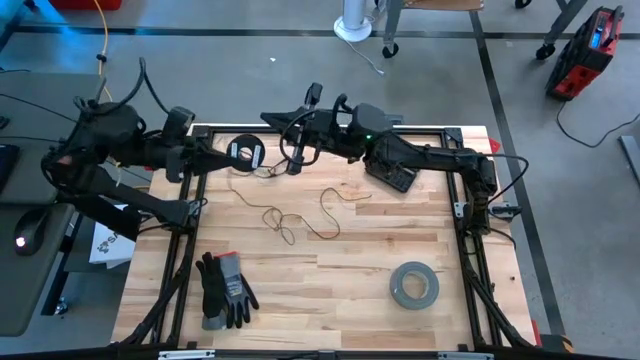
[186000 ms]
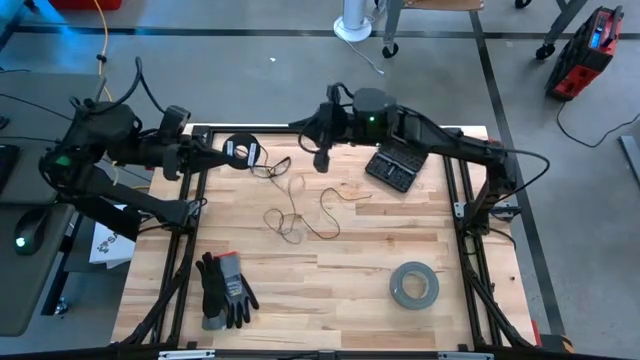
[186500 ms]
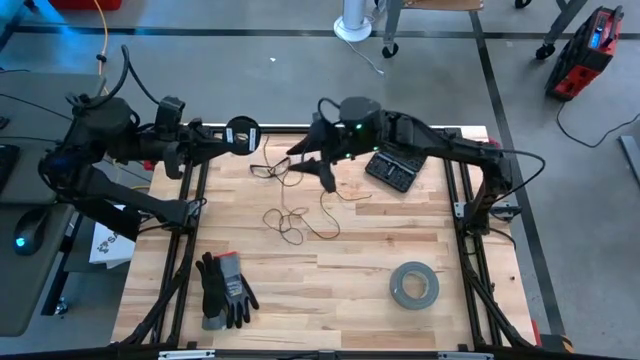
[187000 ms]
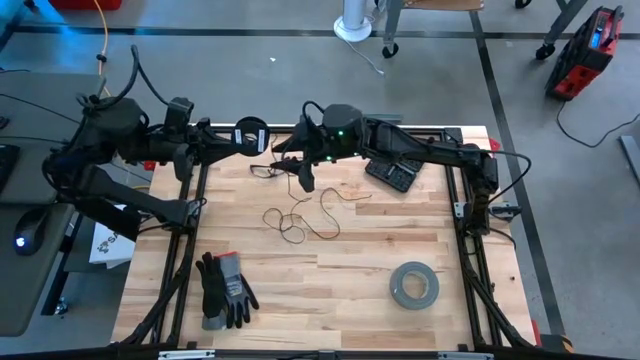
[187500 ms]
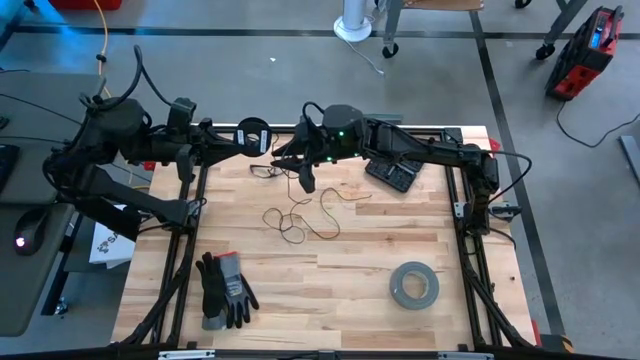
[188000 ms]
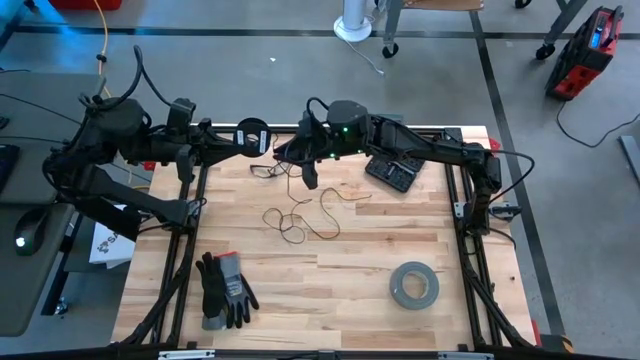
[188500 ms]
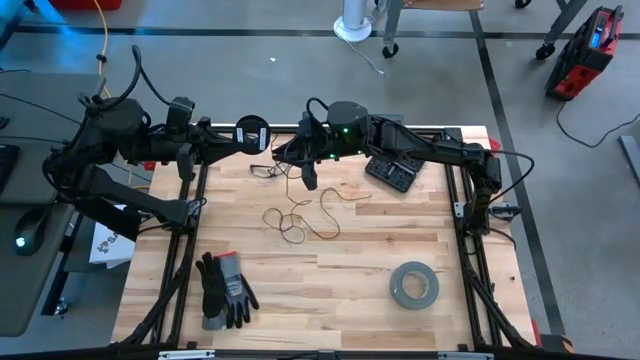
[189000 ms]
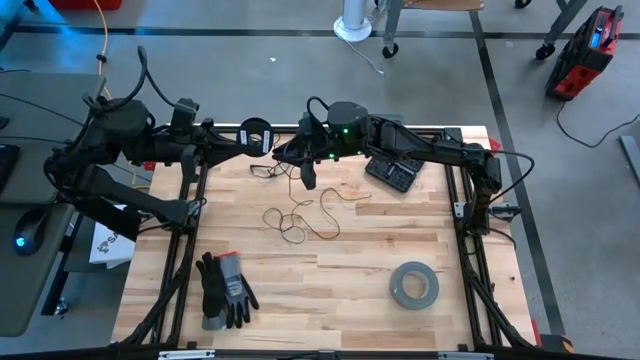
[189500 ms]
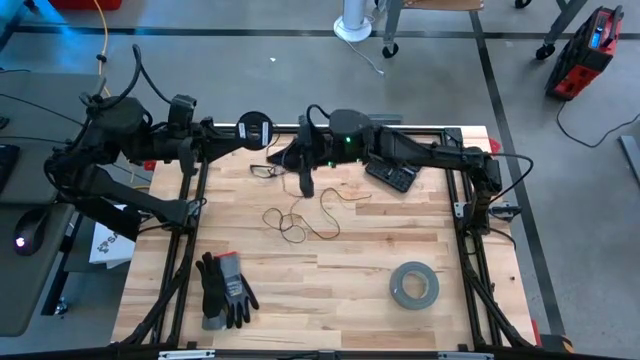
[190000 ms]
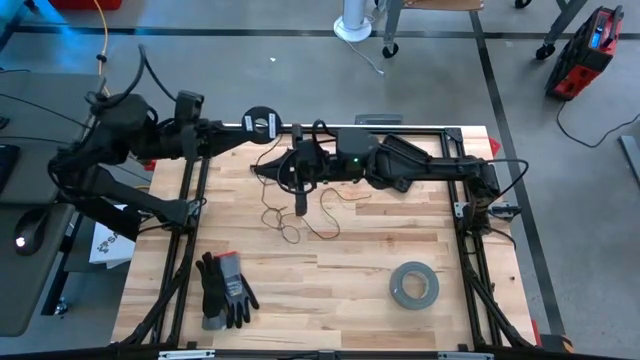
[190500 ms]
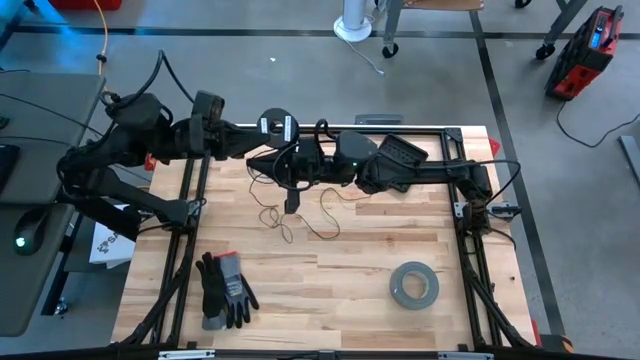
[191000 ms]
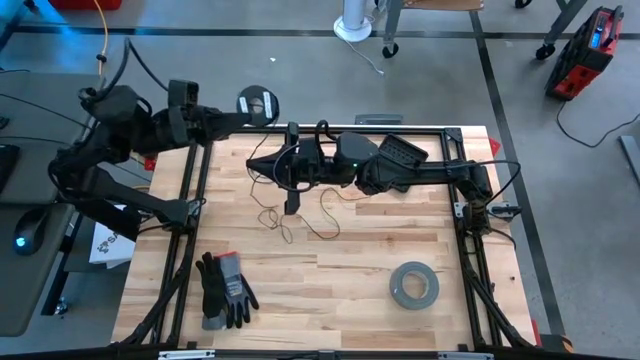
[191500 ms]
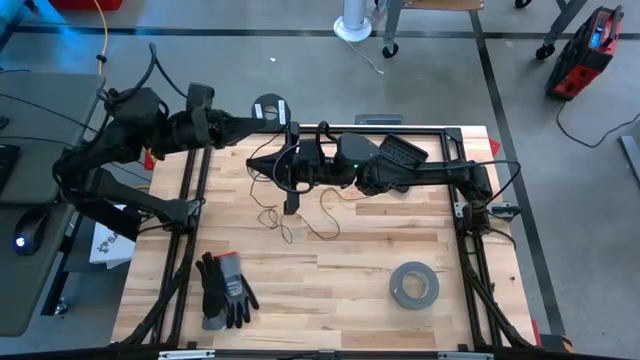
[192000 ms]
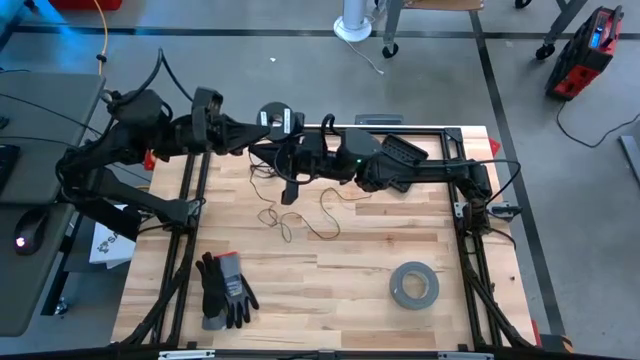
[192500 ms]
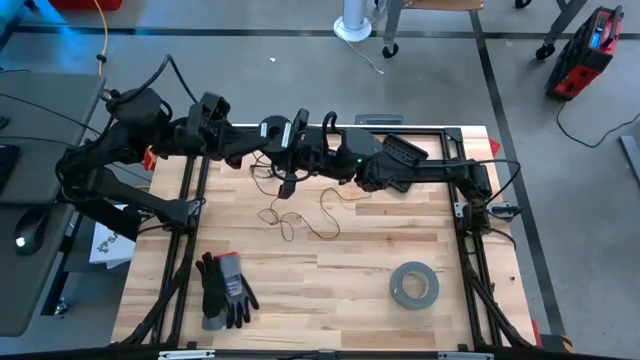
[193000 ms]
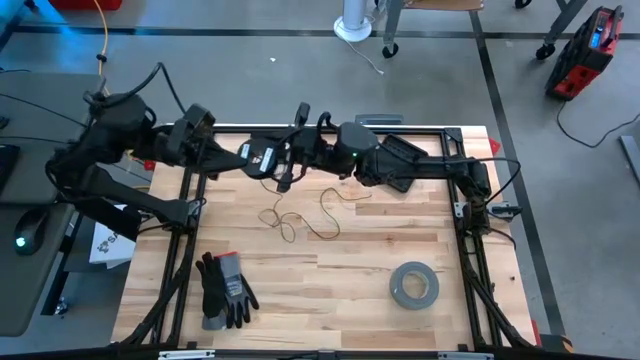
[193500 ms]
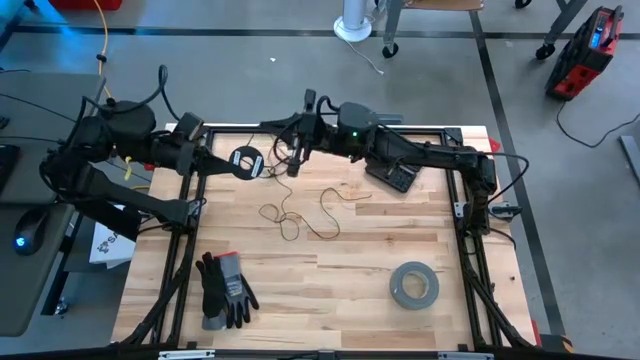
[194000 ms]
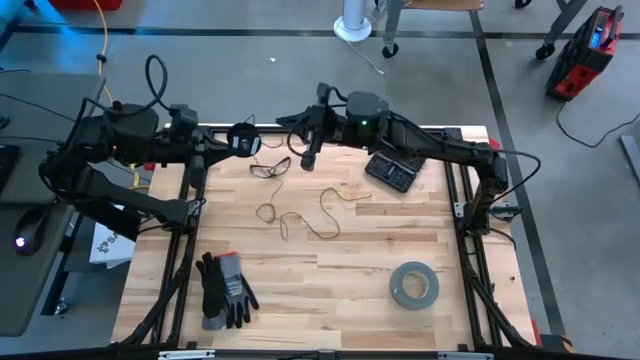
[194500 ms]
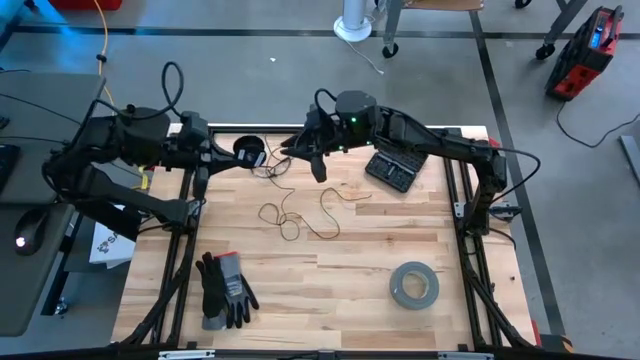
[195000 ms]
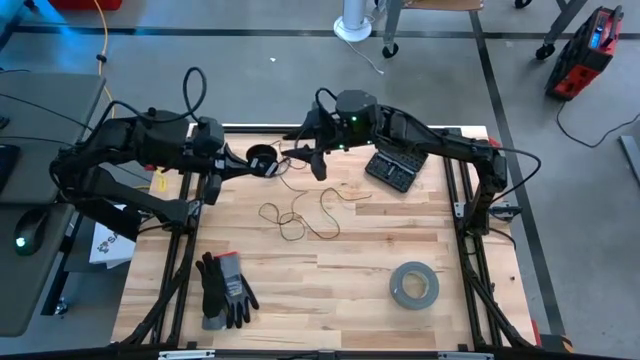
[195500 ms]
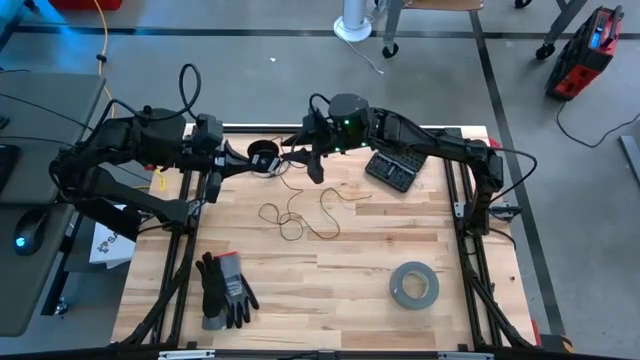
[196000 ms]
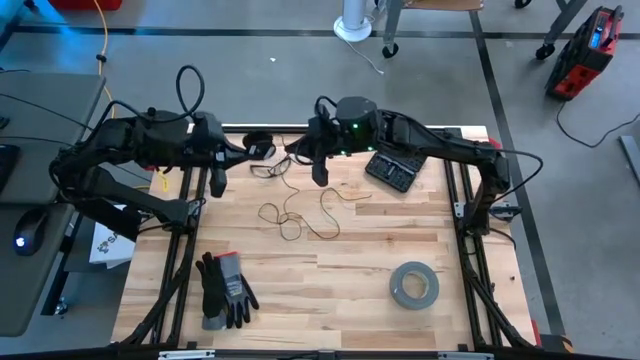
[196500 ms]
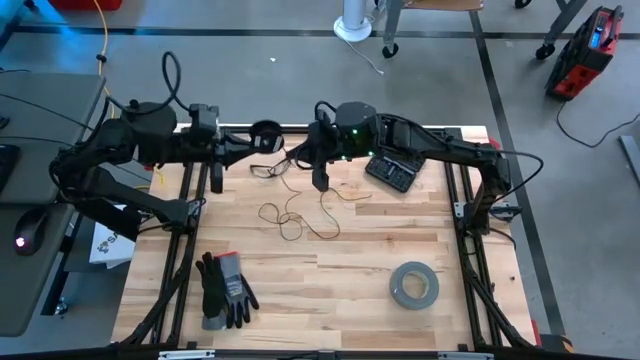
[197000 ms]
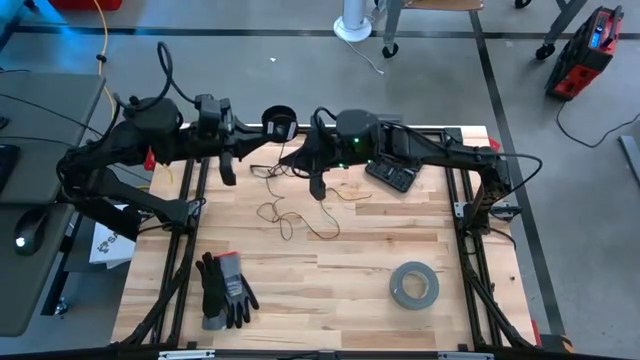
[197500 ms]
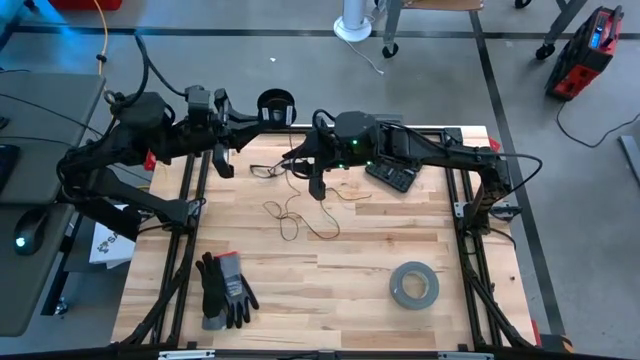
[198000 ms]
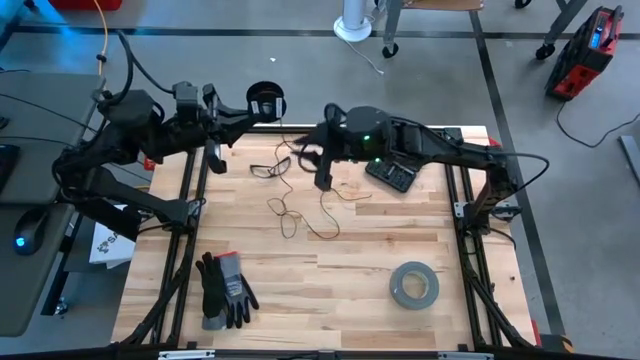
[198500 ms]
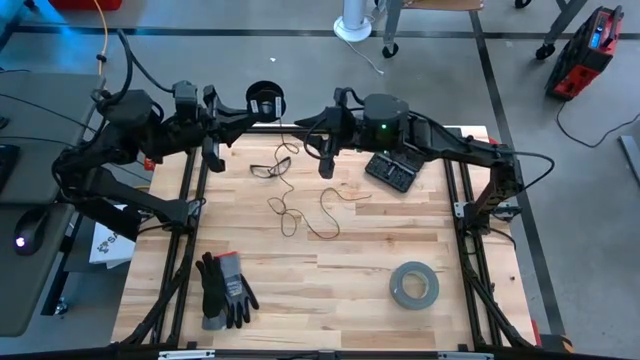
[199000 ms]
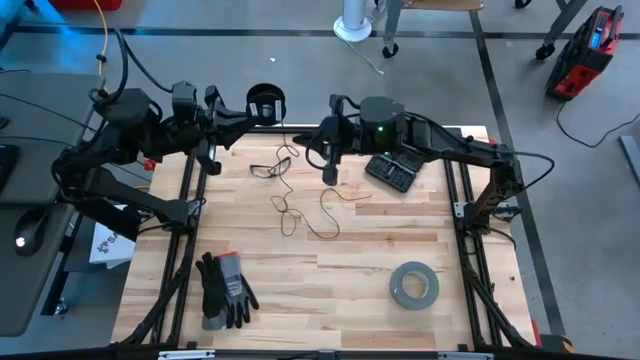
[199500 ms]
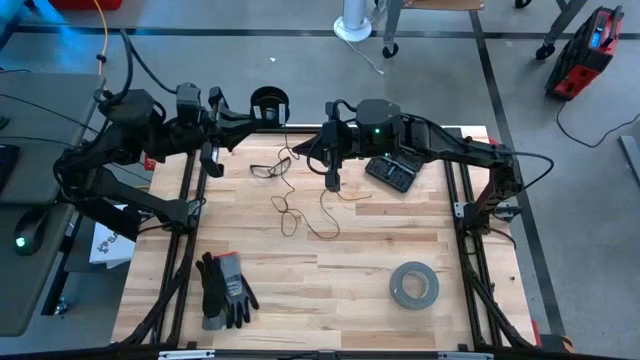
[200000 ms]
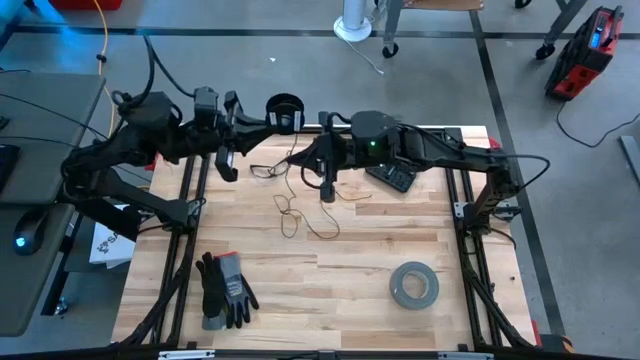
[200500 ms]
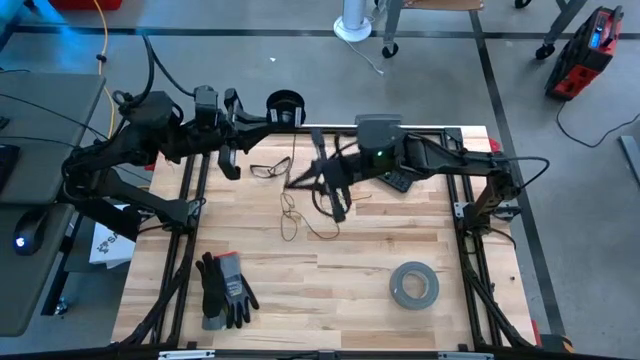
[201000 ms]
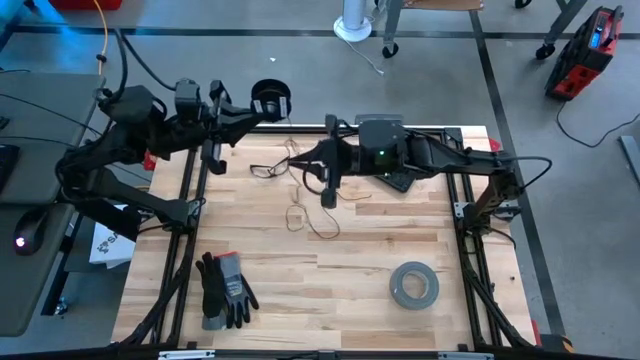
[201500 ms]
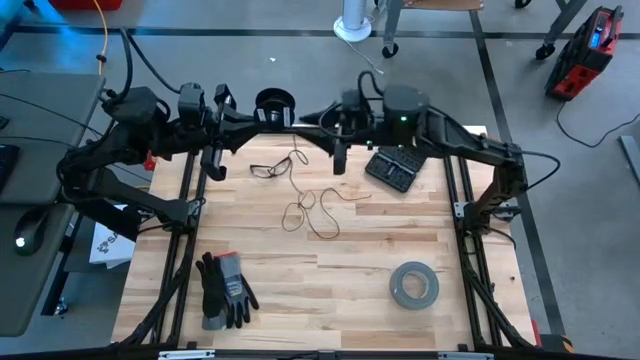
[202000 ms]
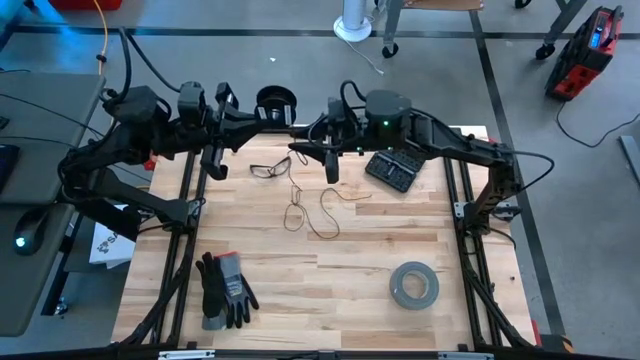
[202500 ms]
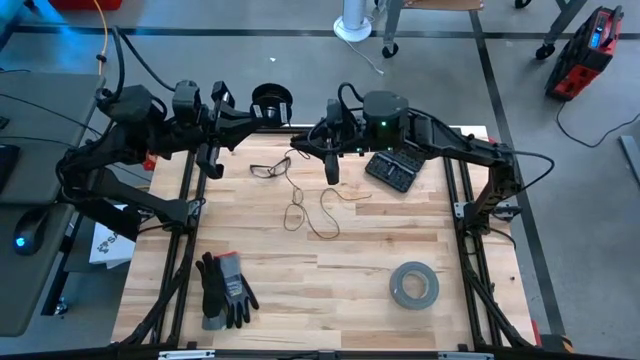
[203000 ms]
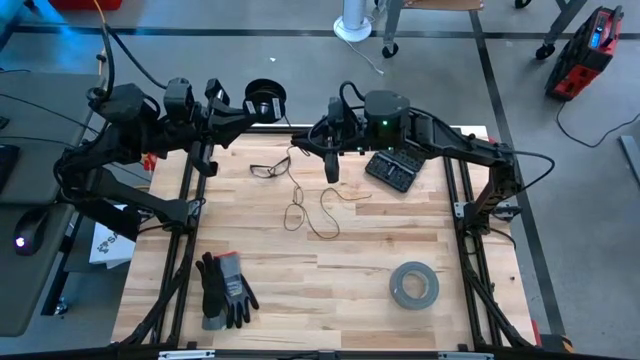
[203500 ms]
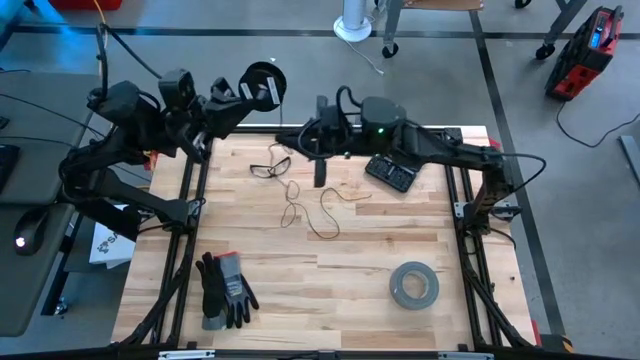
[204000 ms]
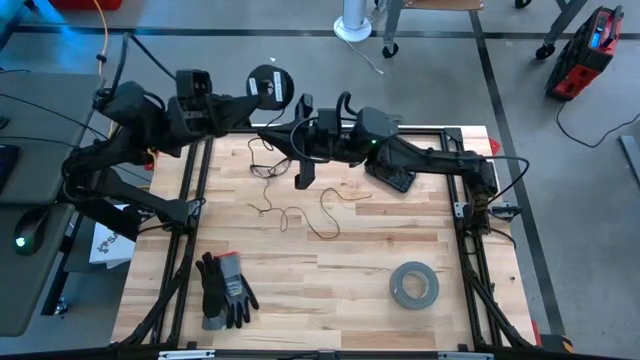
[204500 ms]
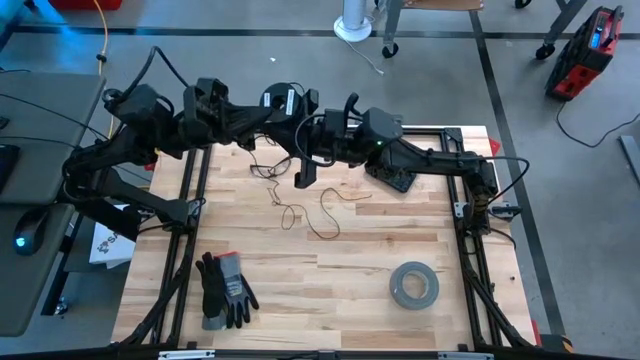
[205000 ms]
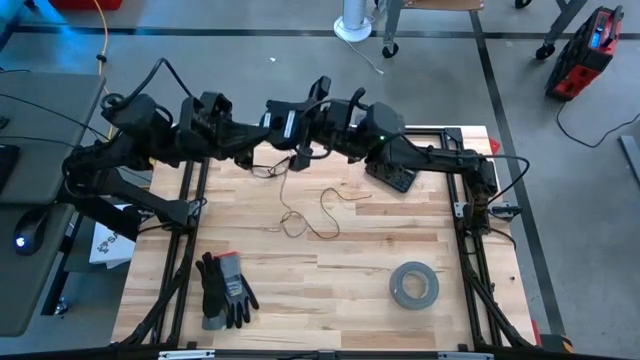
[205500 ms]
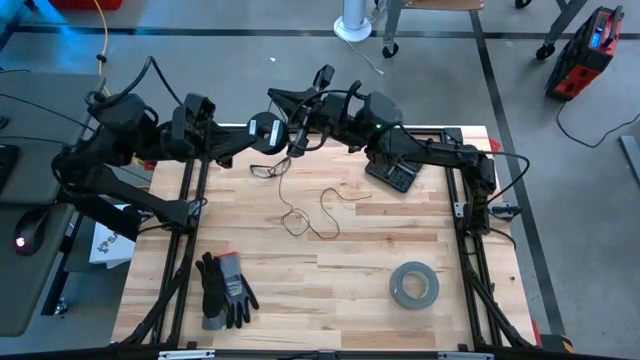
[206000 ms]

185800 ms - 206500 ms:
Task: Coil cords
Coil the black wire on the black spool
